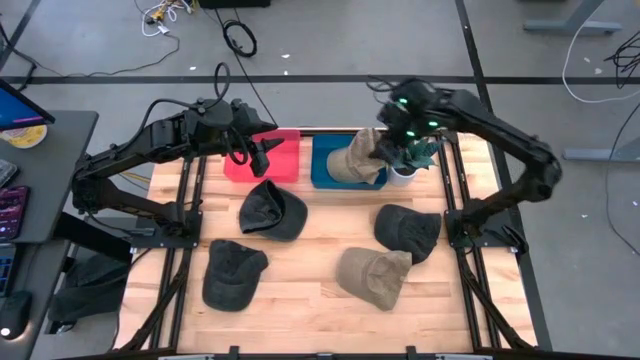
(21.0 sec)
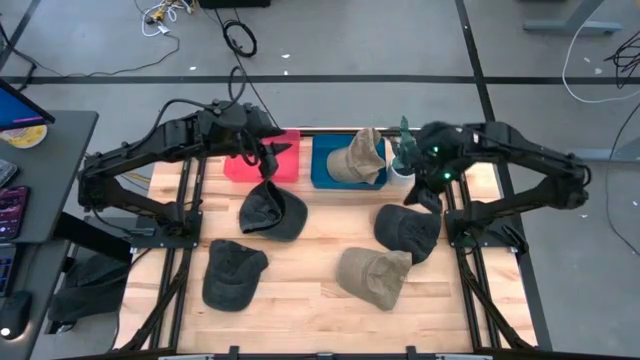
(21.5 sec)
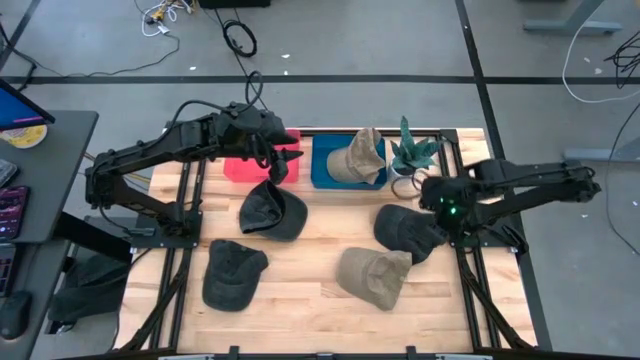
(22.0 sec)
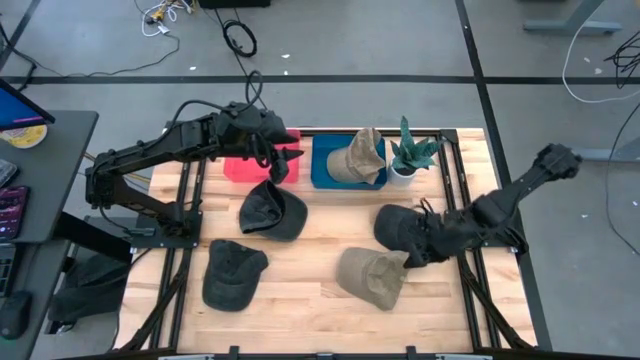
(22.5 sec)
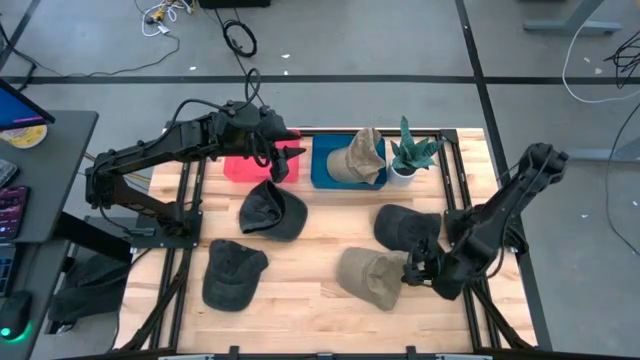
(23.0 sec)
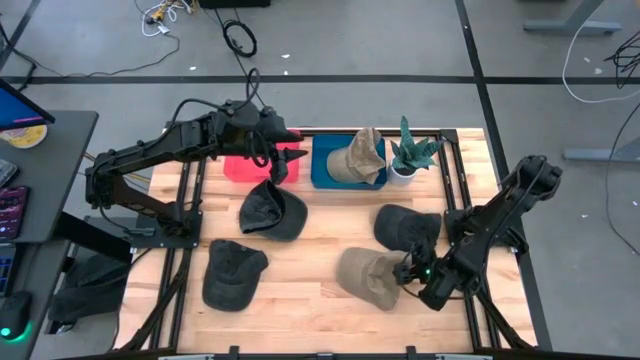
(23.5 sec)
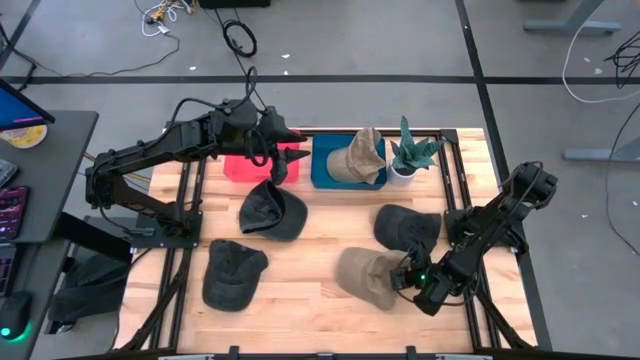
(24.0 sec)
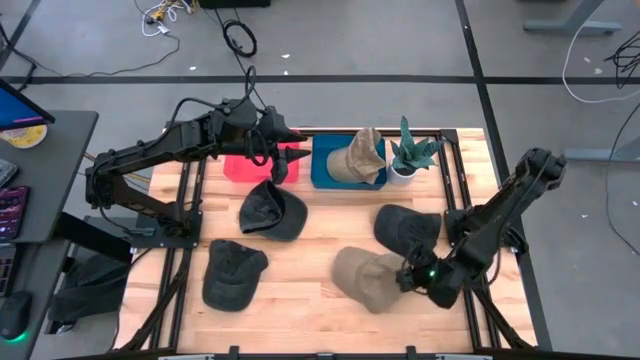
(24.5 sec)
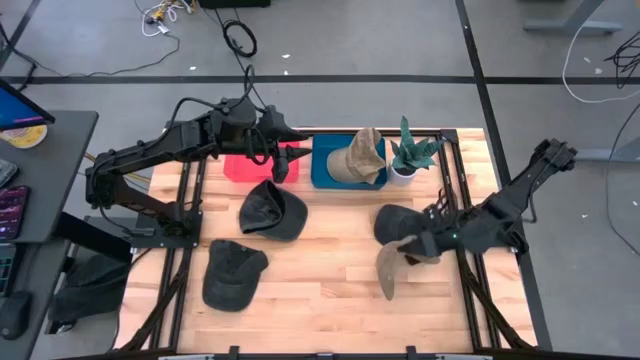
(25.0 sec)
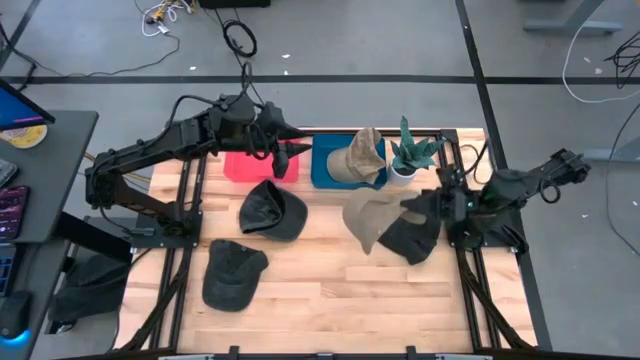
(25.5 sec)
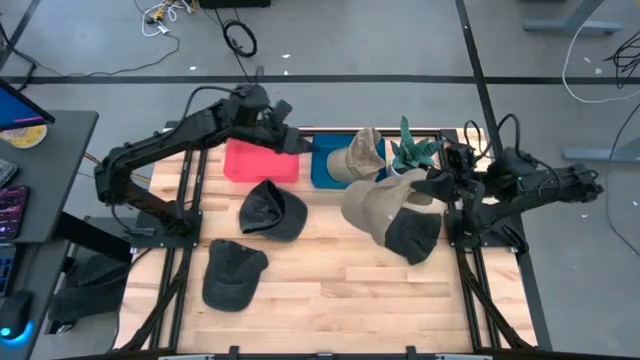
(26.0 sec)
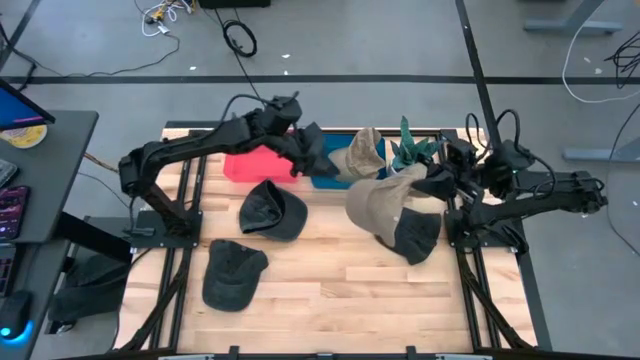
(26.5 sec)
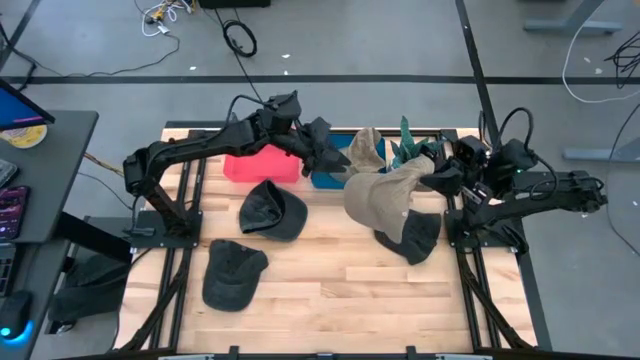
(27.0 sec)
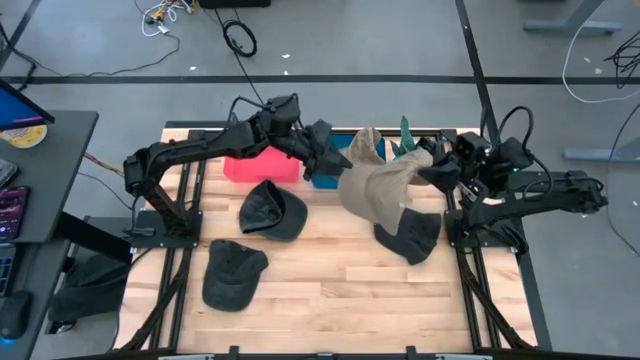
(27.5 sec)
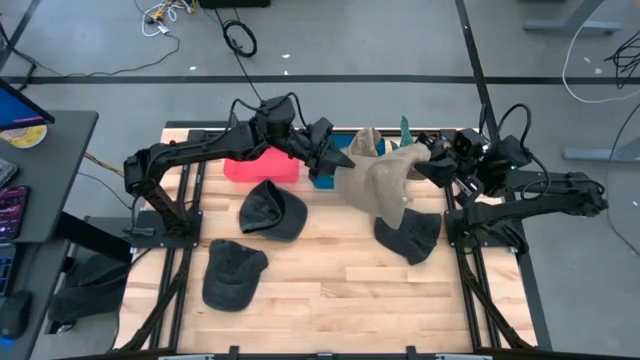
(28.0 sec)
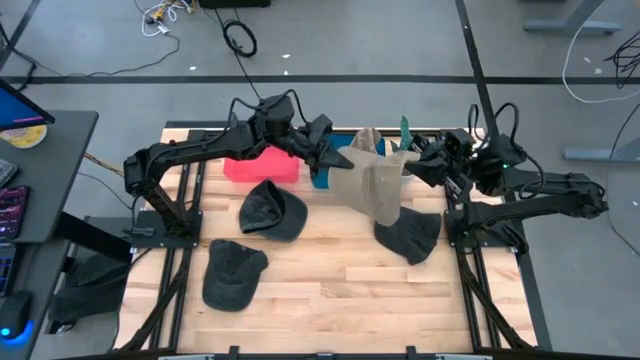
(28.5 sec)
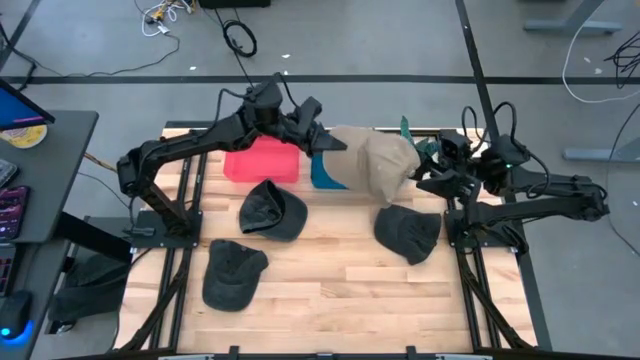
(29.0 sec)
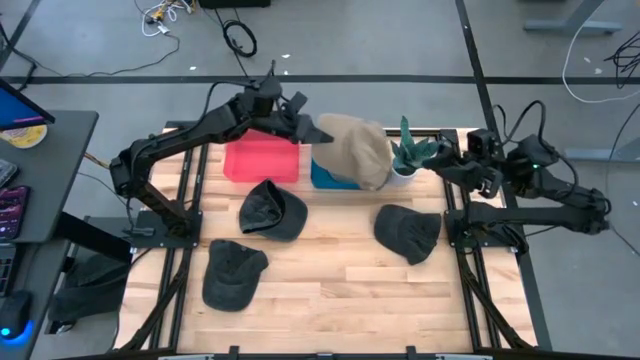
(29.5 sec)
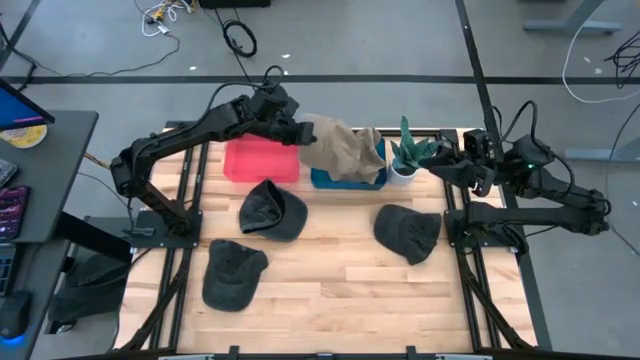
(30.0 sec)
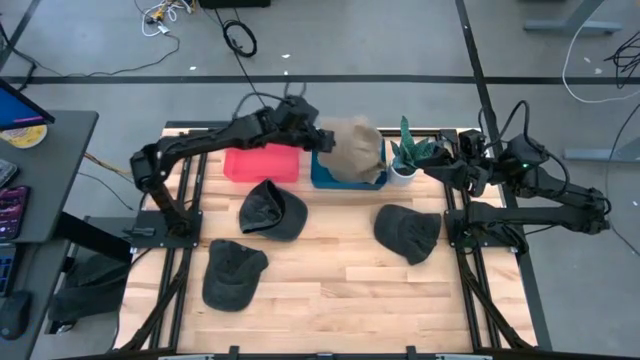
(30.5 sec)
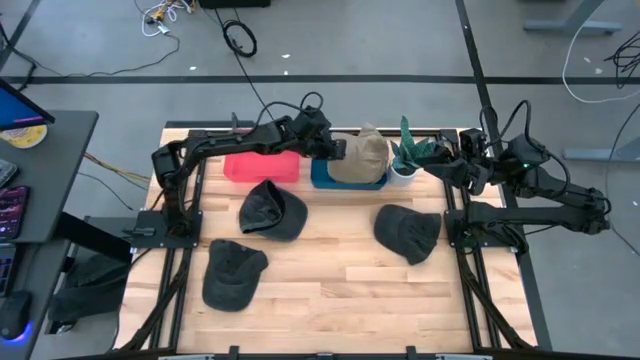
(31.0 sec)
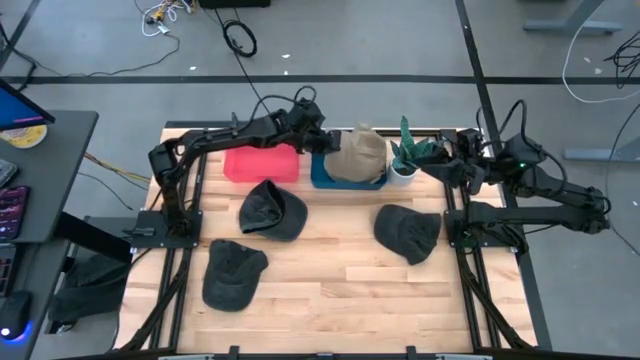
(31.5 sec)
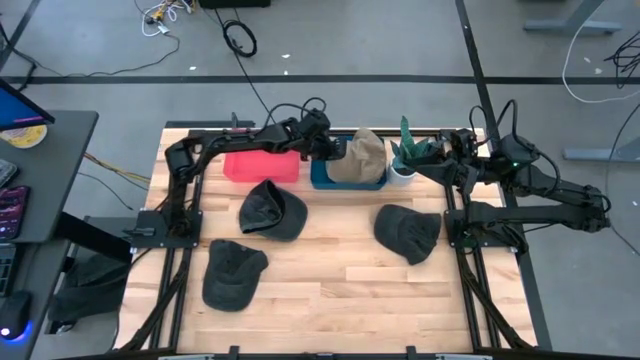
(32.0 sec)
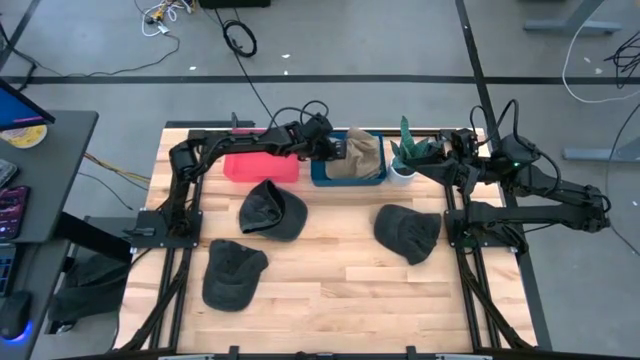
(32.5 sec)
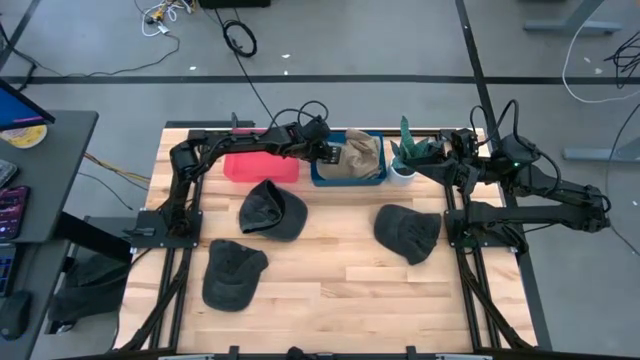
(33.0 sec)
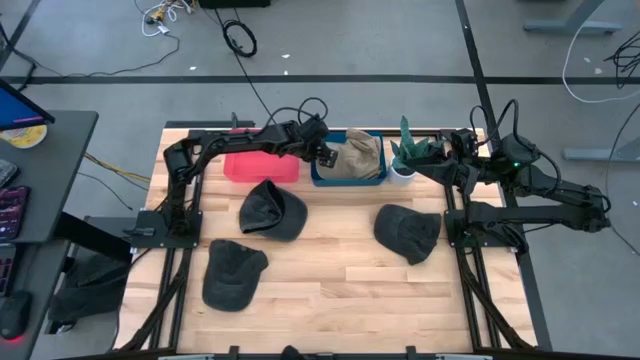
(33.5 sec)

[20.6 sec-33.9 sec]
Task: Pick & Place hat
Put the light brown cap into the blue bin

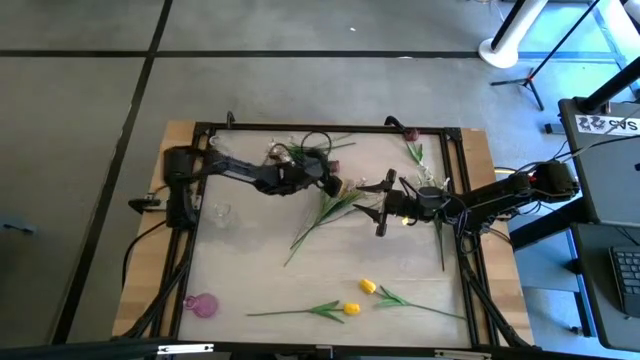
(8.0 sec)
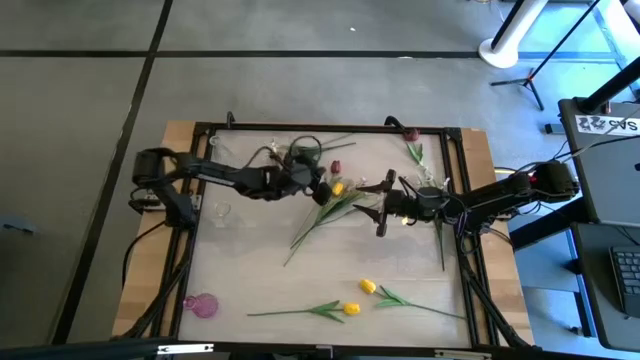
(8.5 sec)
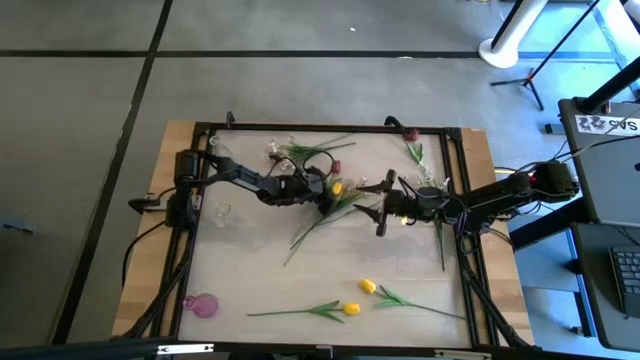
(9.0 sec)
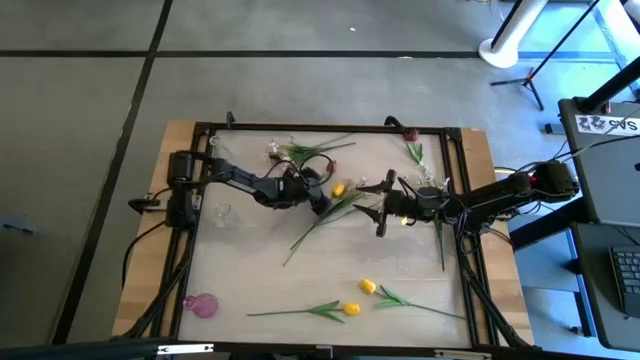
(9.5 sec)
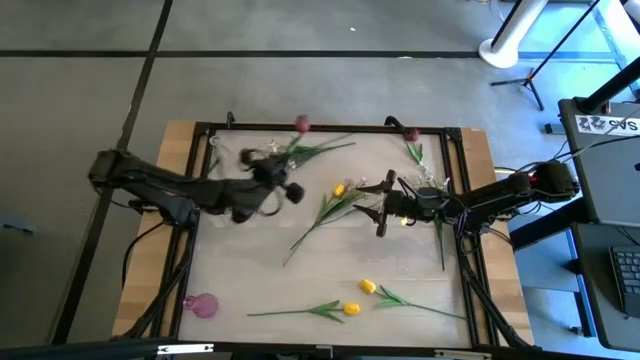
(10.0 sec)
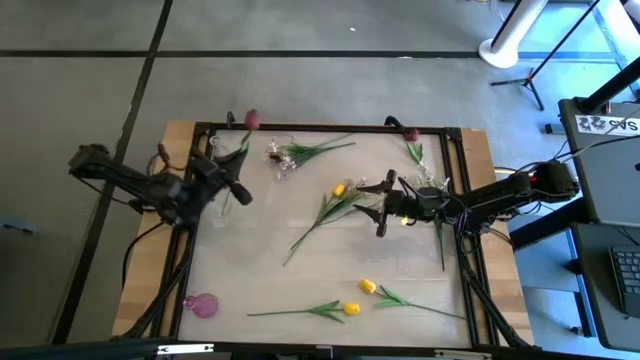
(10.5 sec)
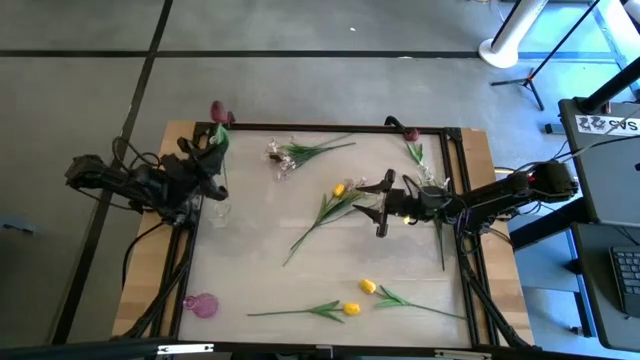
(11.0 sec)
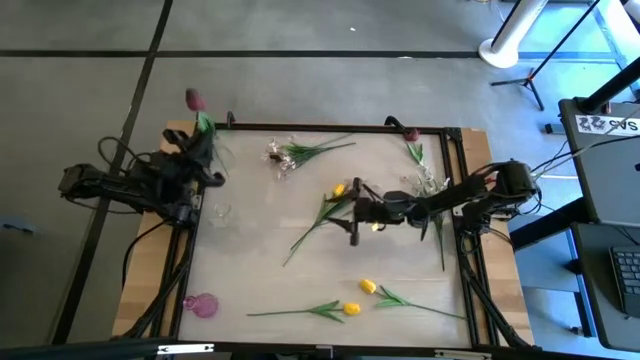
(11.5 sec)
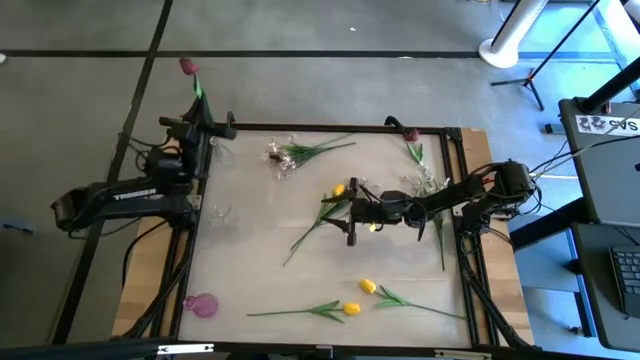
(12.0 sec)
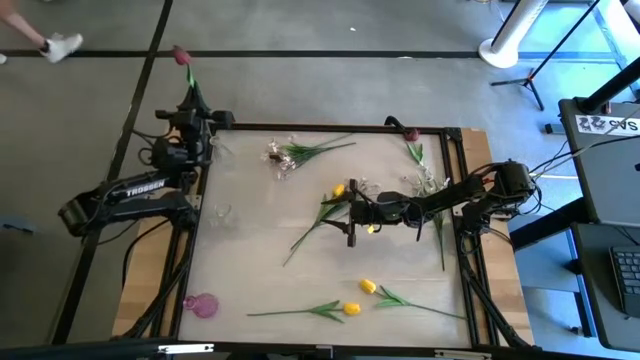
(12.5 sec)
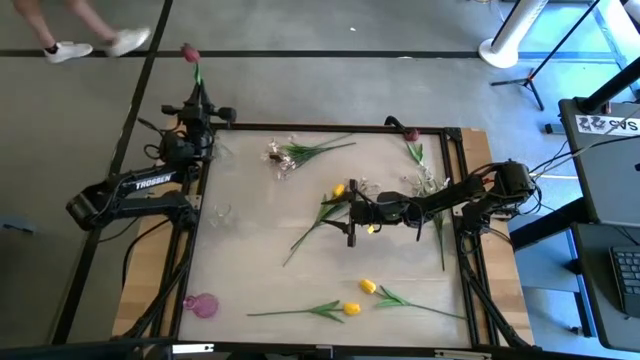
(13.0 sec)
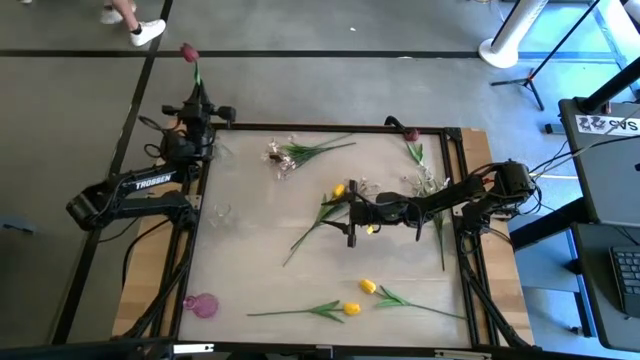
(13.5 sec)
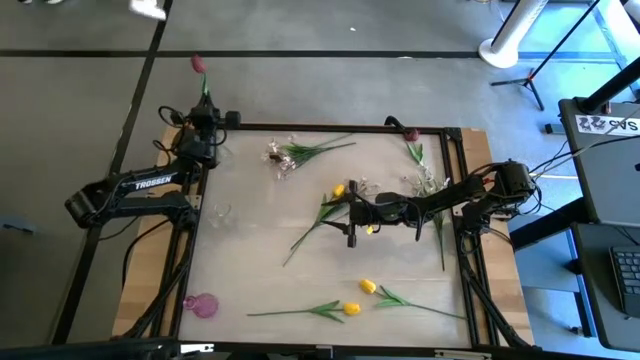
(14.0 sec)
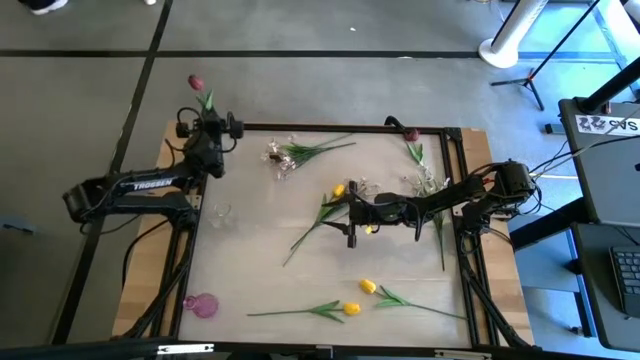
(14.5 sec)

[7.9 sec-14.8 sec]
Task: Sort flowers into vase by color
Put the bottom red flower into the top transparent vase
